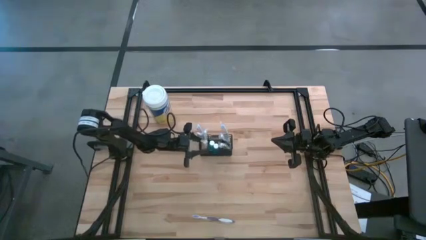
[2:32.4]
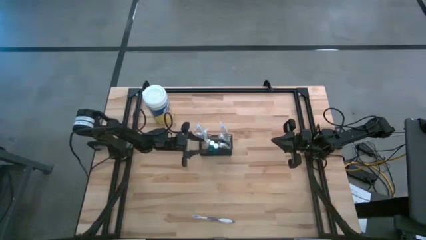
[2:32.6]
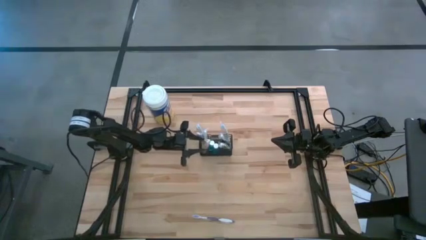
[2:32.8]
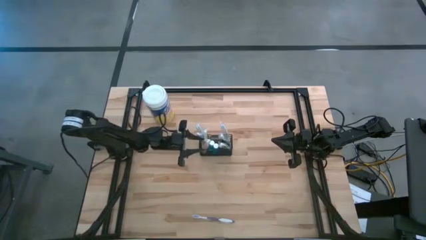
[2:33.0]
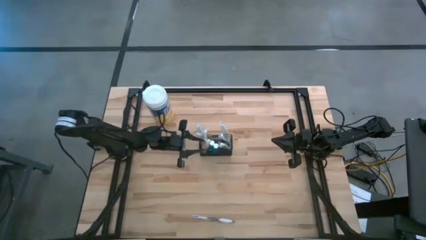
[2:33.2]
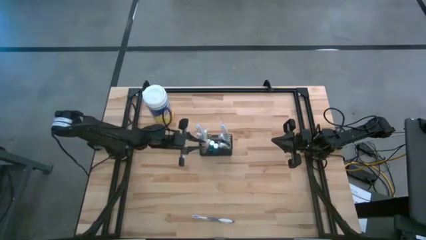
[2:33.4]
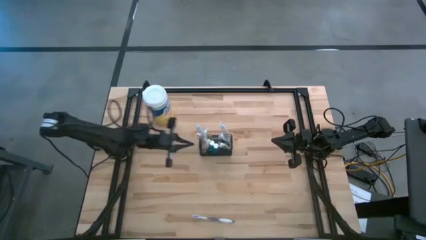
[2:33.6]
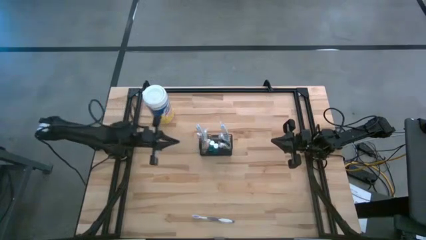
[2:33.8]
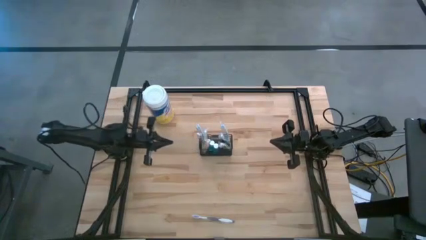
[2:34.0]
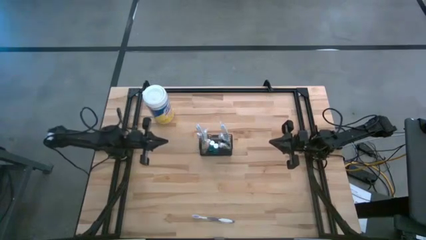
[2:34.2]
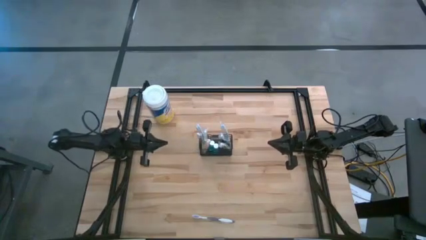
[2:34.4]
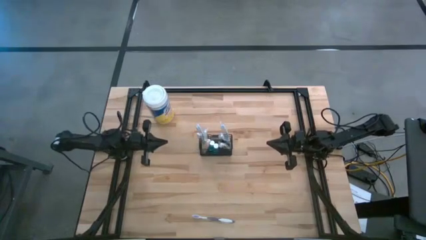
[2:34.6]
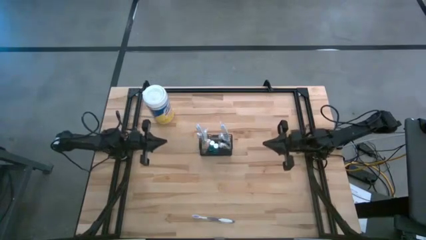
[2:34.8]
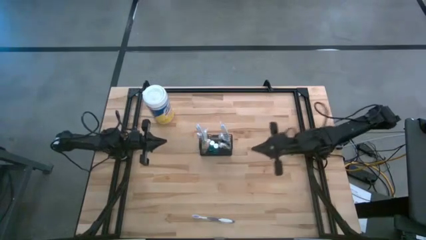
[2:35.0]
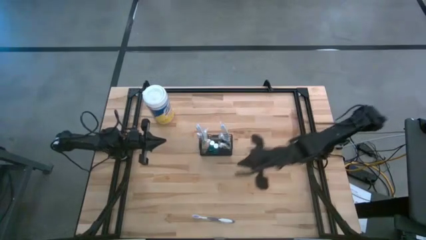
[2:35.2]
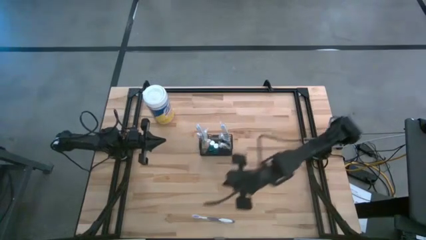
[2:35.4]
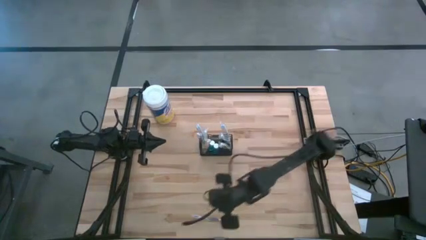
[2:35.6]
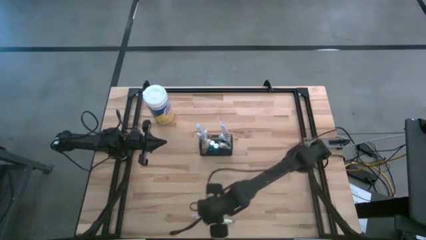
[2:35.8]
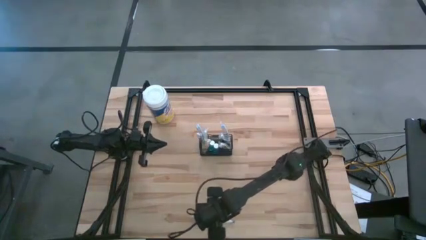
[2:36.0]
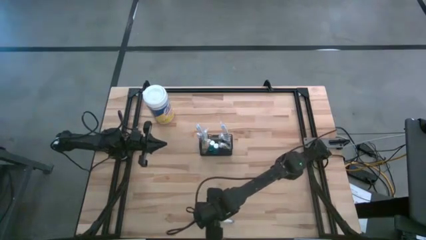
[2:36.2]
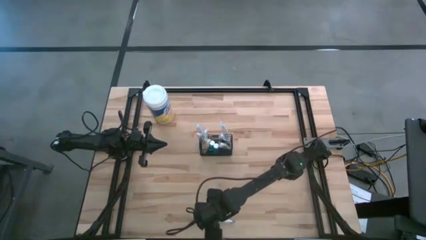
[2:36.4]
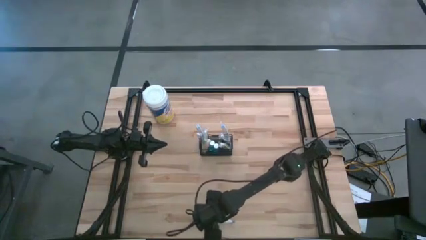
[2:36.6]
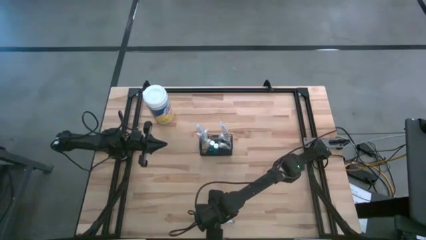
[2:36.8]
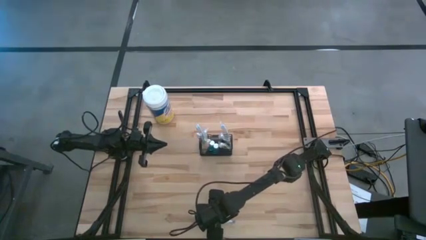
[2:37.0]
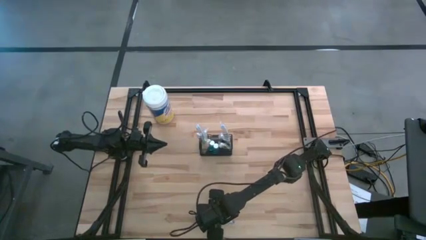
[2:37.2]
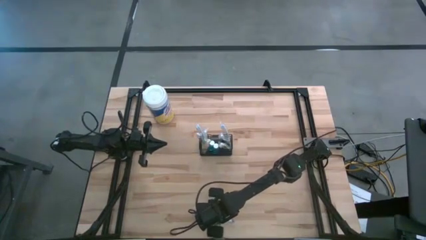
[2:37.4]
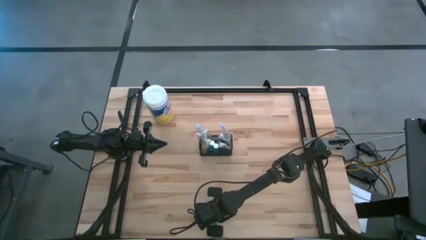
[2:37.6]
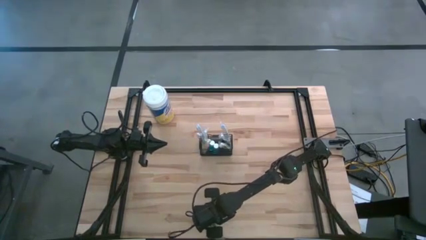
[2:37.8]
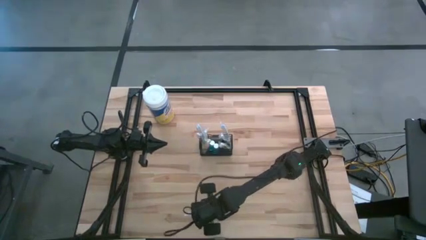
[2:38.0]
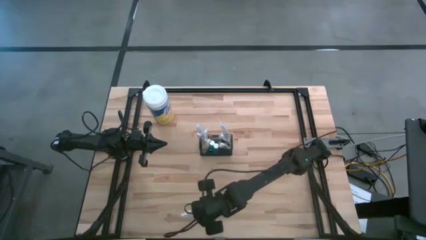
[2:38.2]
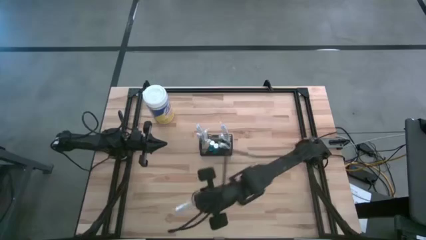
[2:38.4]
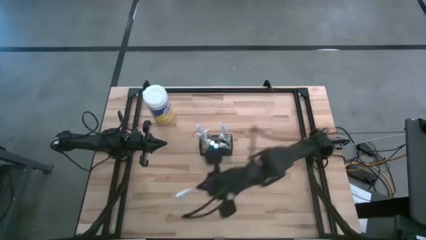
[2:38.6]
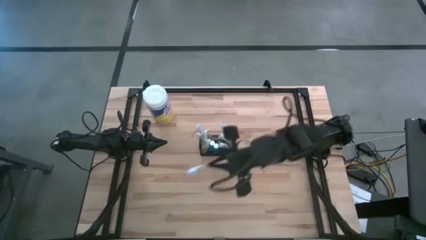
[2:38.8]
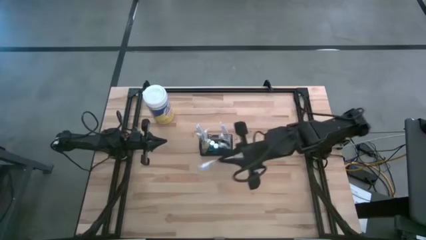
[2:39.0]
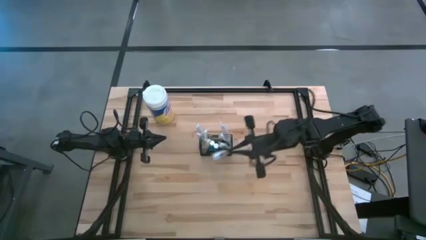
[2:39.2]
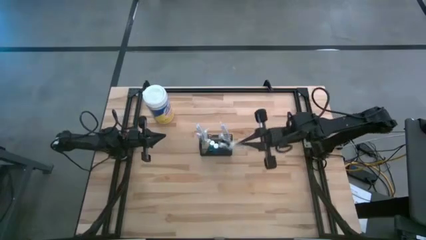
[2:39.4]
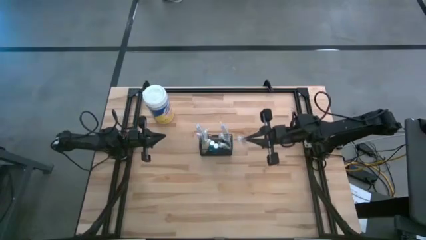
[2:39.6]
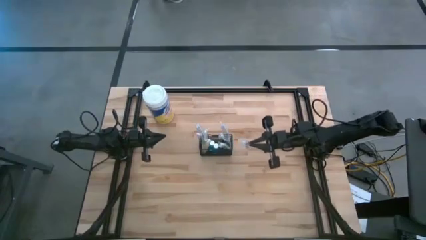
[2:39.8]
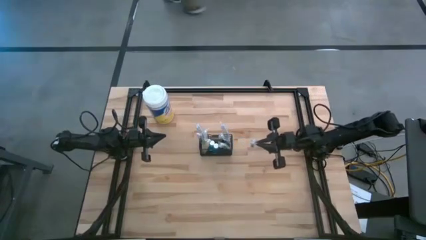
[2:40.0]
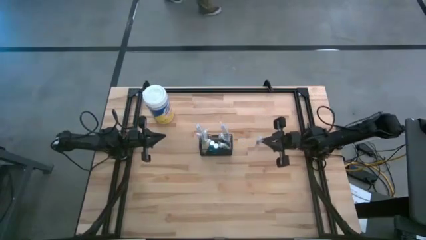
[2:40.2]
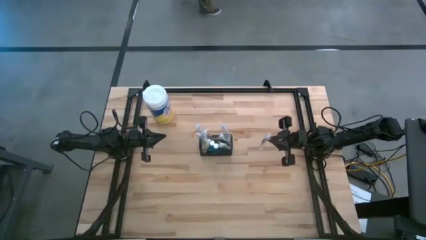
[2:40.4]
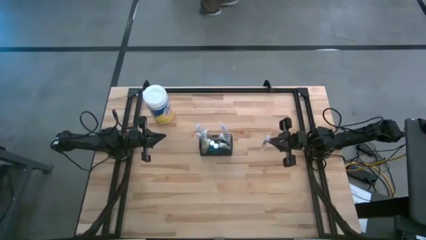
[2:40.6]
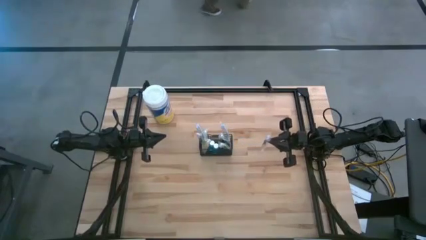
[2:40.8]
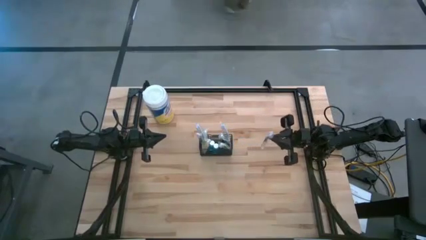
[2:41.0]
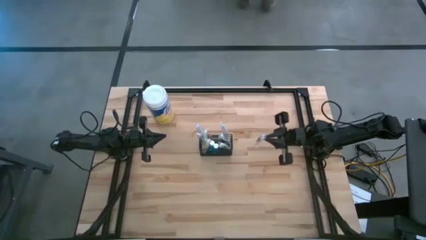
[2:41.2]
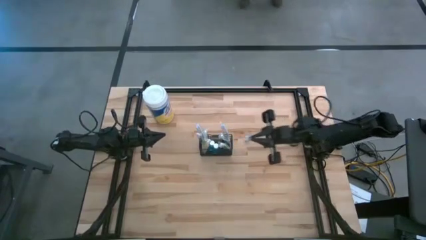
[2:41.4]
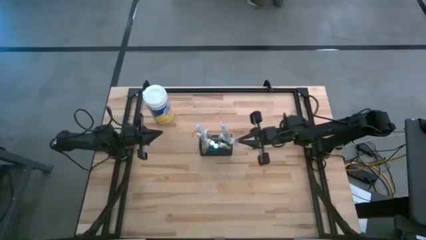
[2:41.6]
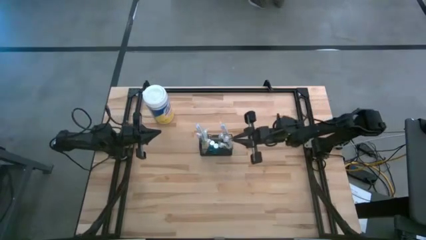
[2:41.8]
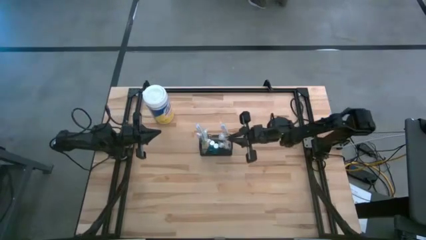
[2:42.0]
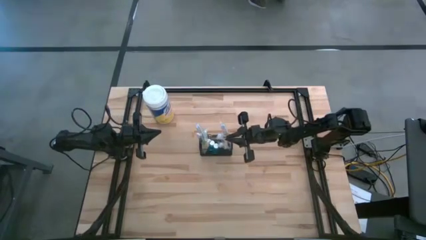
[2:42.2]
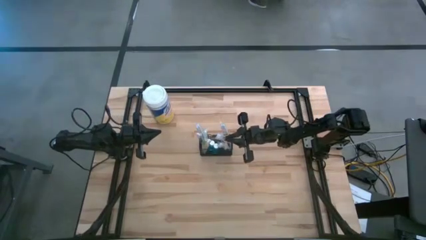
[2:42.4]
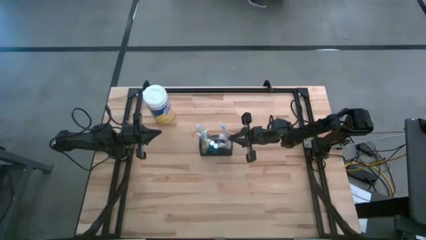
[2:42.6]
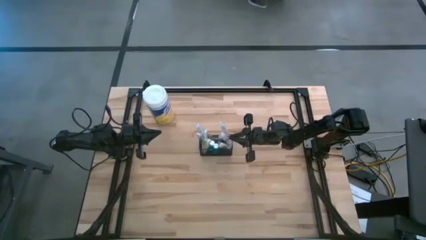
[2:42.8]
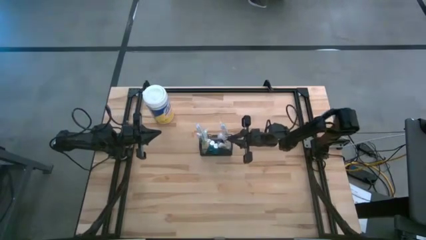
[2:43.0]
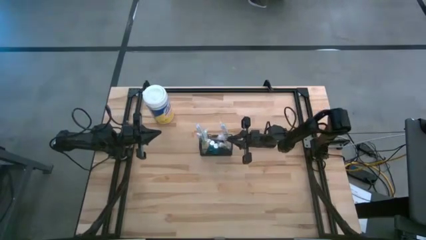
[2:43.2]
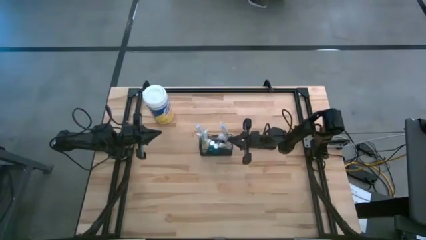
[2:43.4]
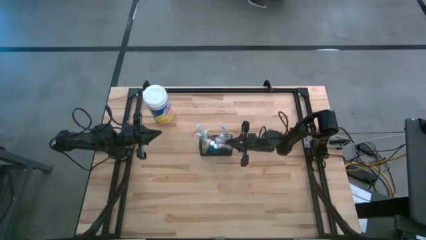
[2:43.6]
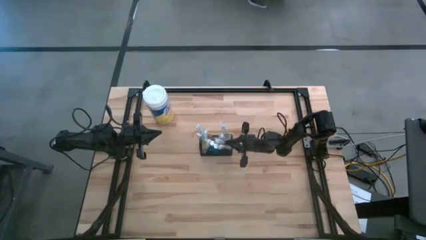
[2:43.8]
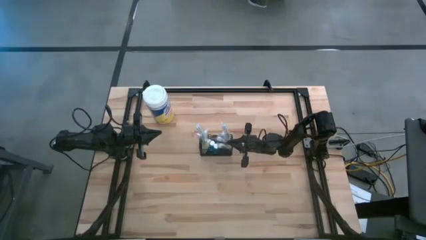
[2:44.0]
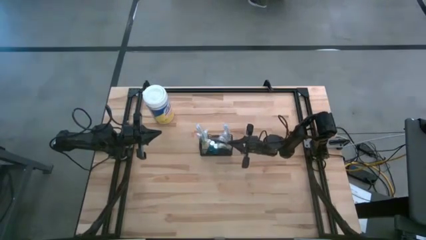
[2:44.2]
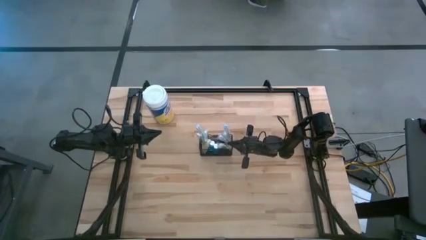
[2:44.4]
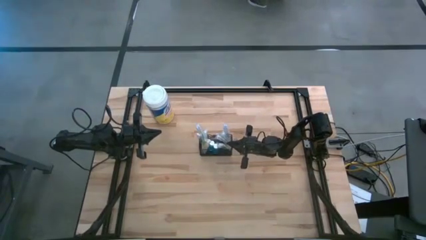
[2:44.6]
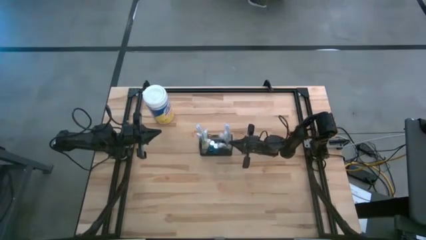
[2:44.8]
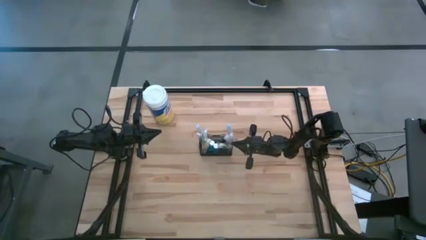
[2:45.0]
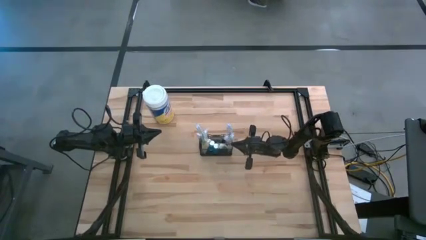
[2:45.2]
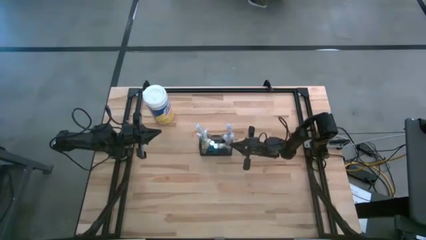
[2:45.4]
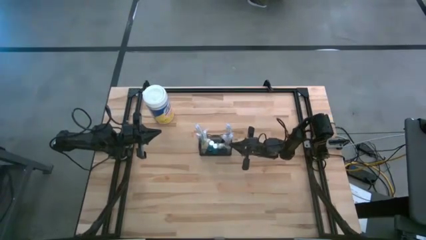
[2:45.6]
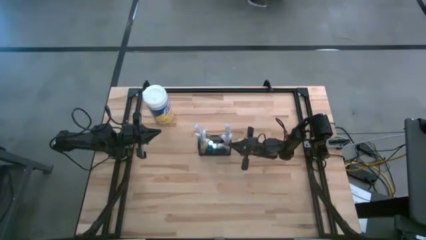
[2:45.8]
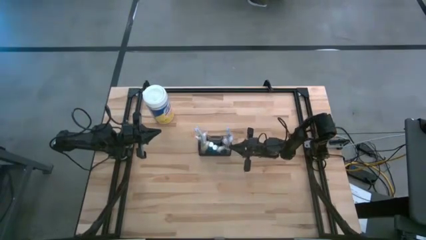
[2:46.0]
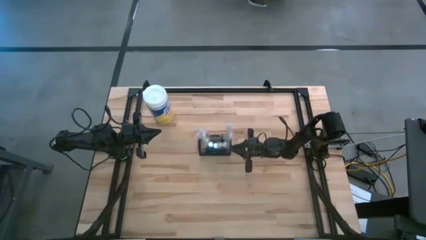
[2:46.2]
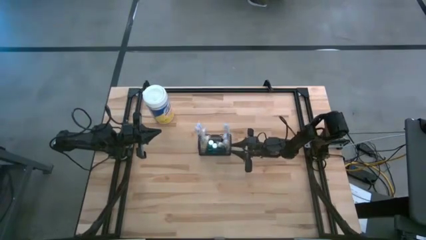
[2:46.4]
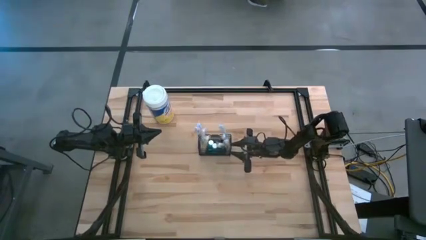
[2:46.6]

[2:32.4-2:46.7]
Task: Pick & Place toothbrushing station
Put the violet toothbrush into the mesh organizer

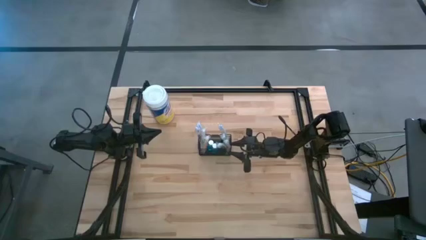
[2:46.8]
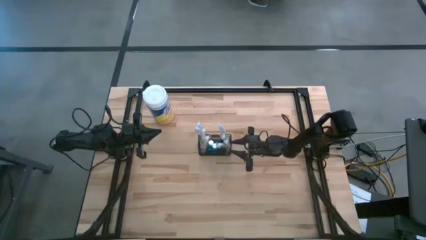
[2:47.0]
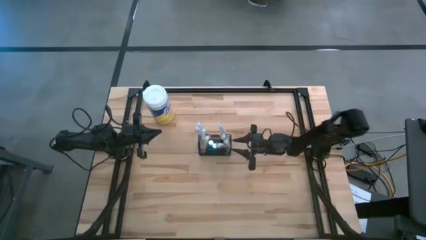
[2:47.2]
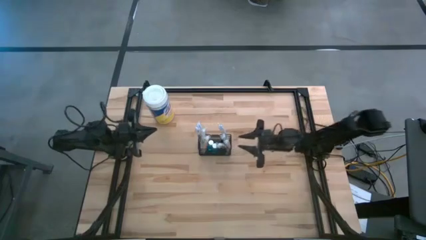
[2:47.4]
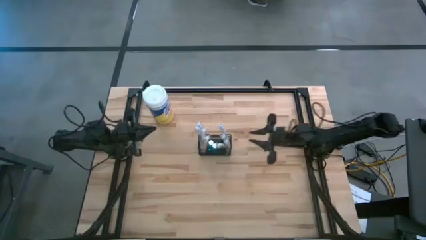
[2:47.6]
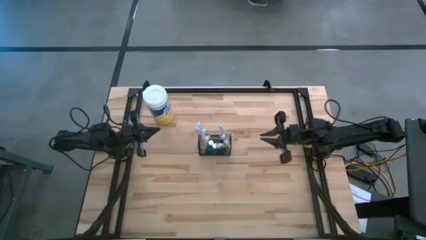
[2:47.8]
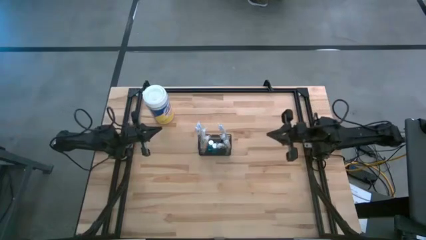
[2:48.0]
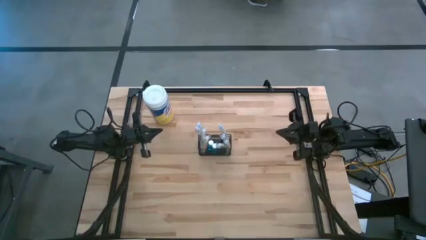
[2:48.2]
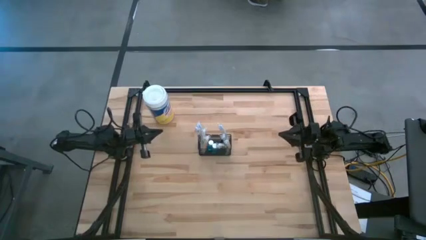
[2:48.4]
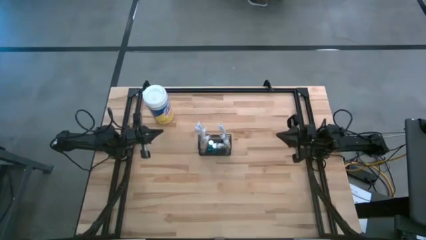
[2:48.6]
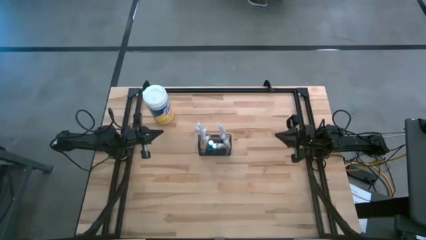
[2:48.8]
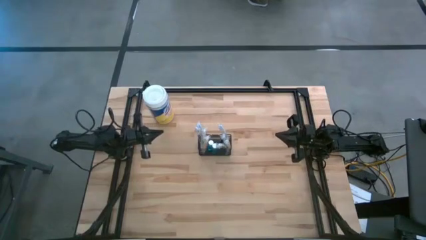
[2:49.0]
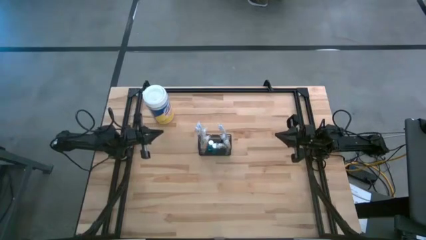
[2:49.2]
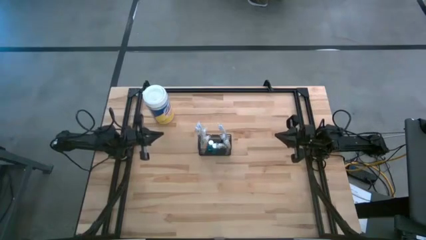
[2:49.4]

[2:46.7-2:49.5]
Return to Home Position
